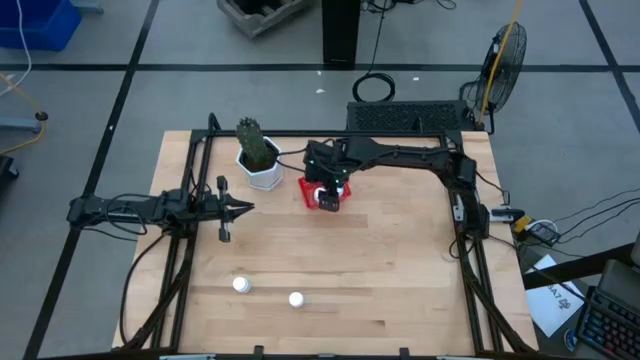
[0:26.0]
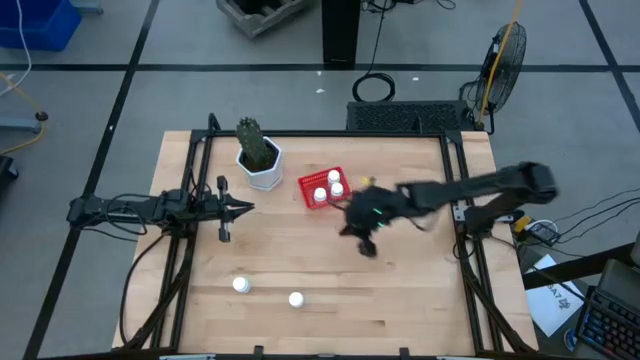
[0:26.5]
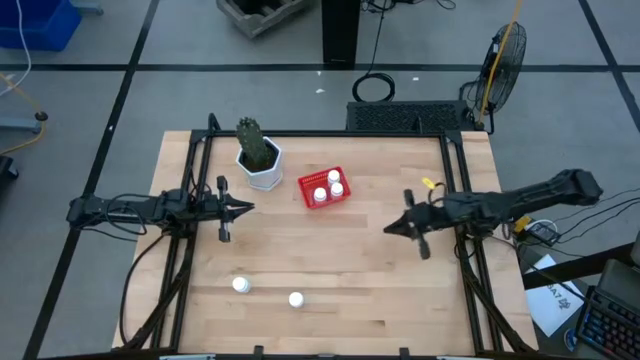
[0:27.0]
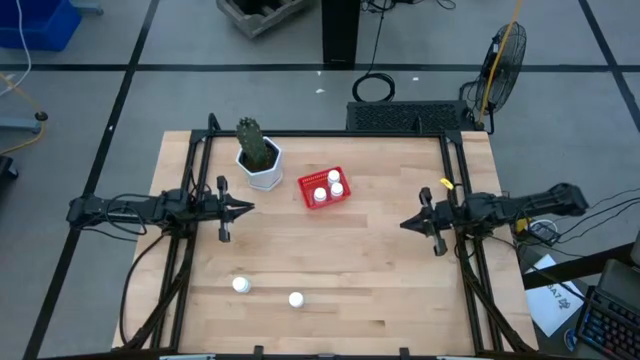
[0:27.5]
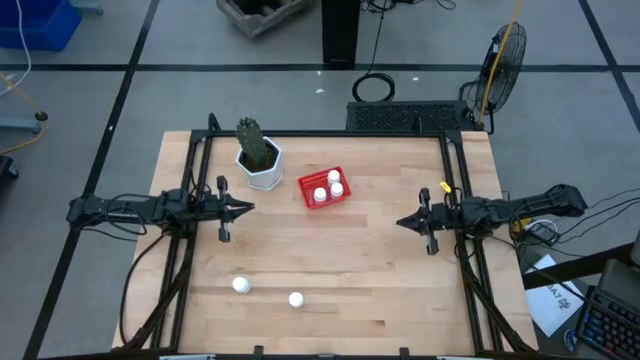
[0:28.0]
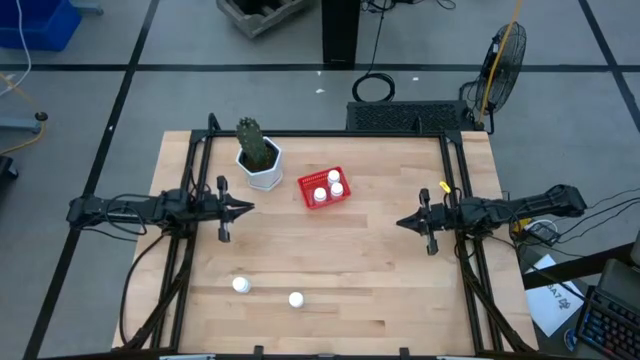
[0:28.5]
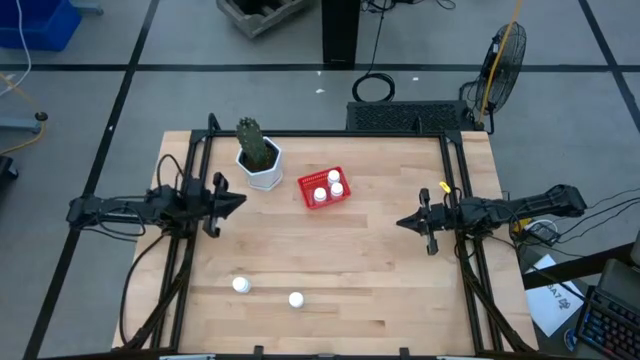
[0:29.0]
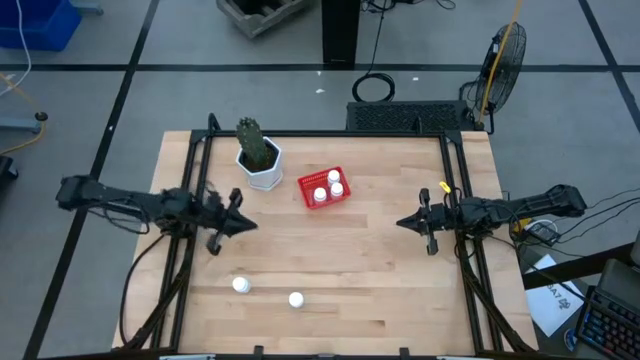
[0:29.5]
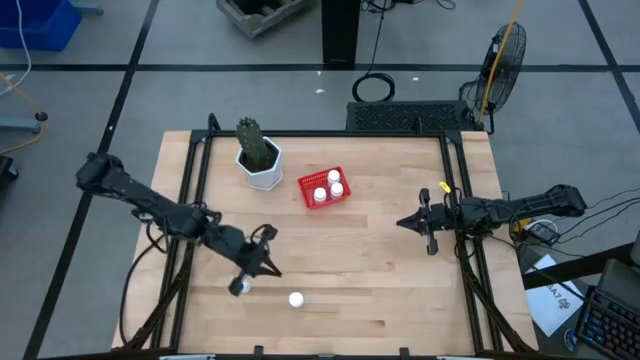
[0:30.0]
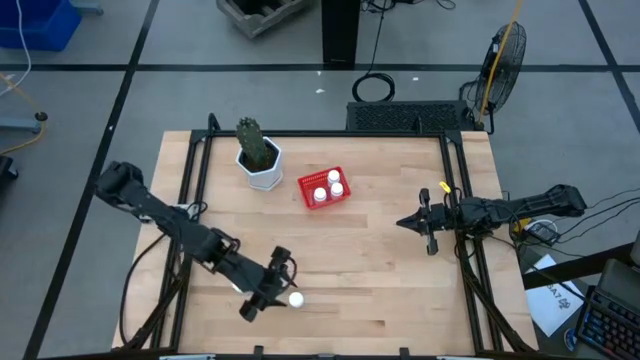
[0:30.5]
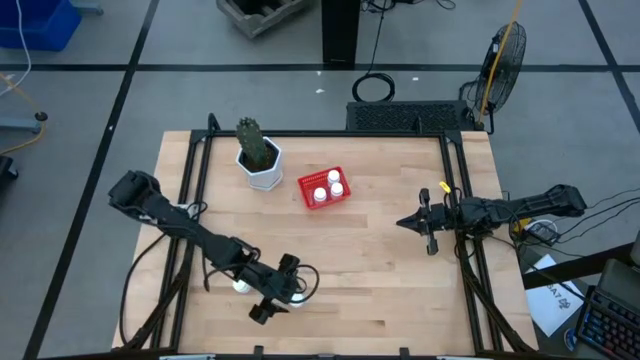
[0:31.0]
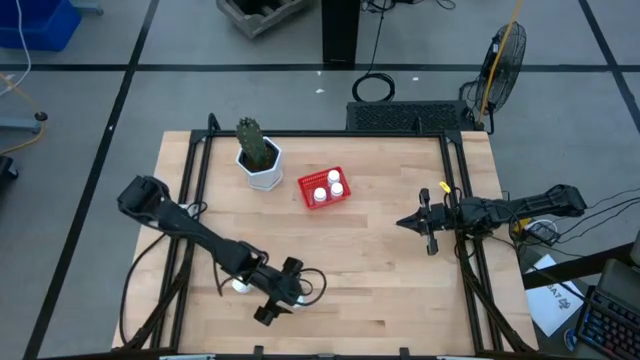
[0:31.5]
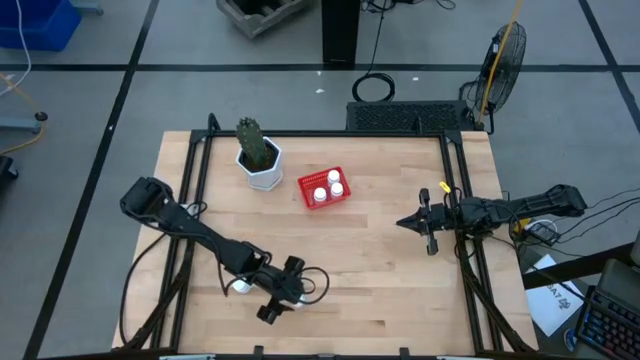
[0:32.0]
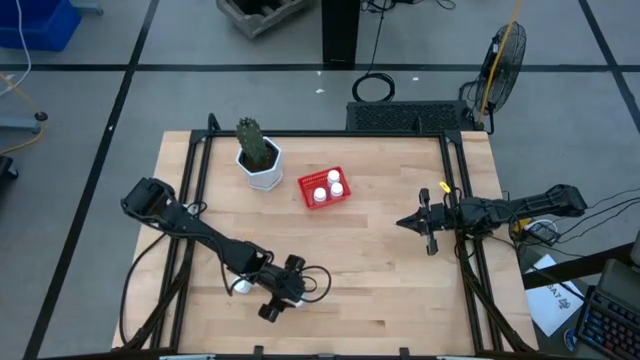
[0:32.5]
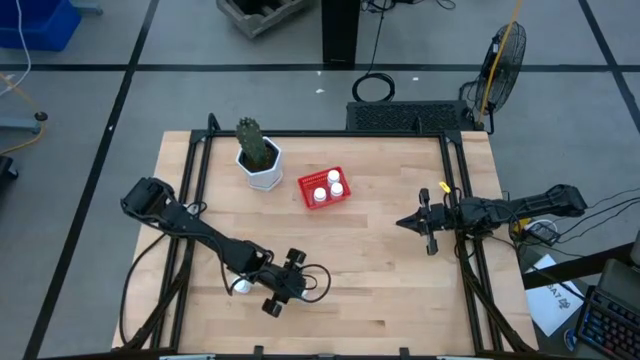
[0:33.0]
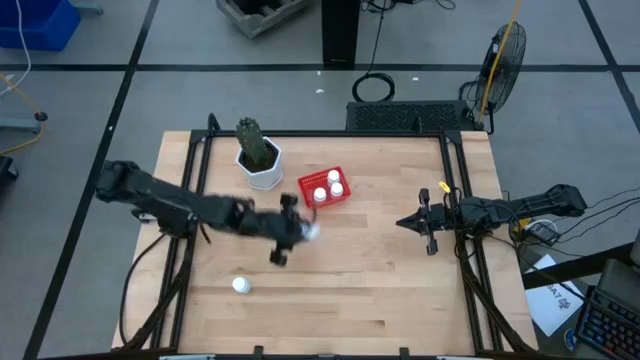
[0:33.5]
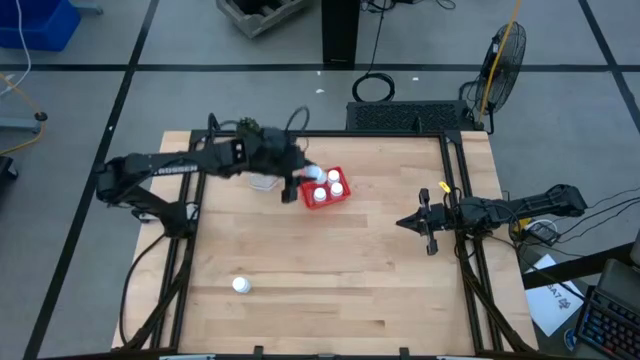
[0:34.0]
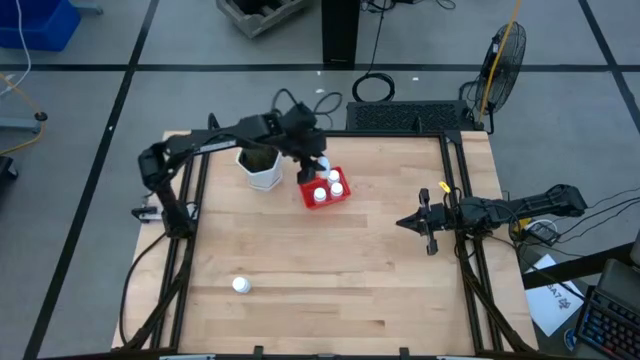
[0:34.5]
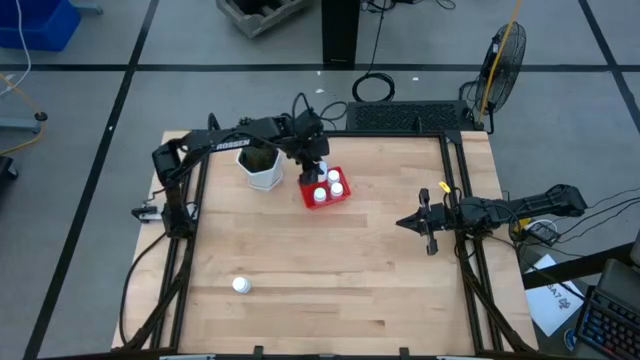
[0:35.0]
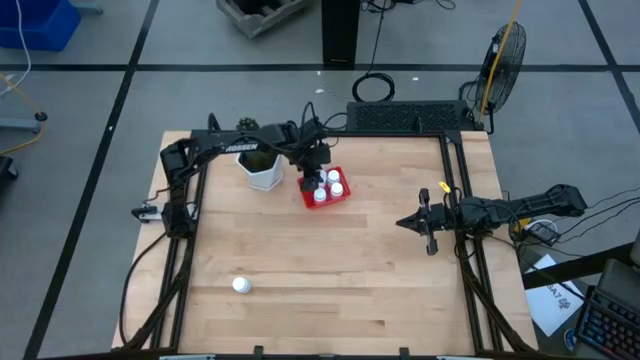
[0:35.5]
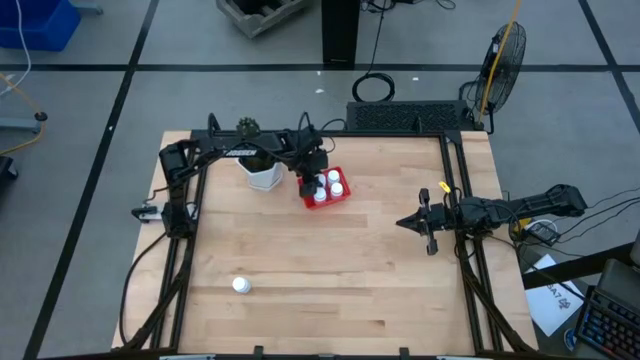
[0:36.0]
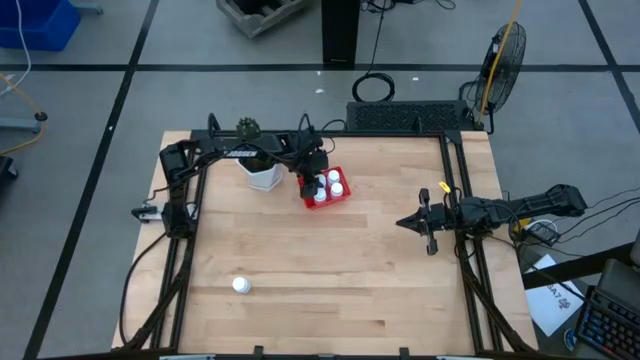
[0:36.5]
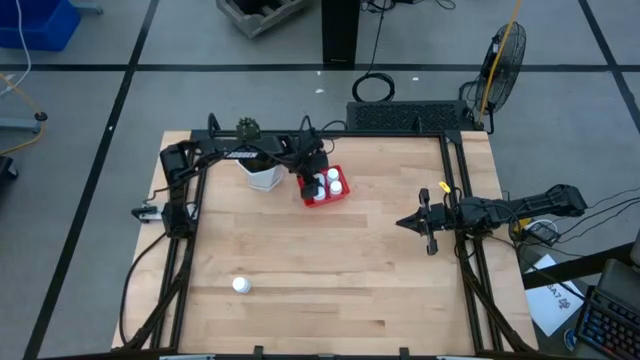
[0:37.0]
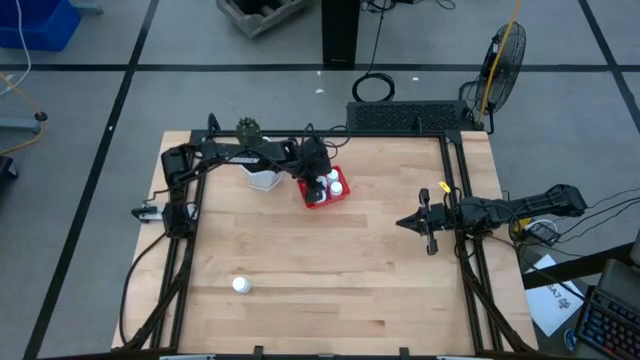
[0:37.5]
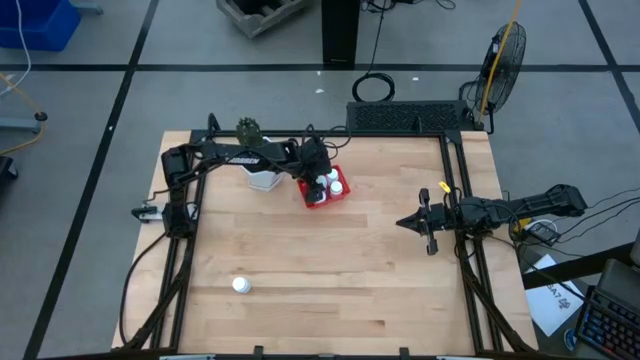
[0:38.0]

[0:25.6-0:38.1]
Task: Pick and place pill bottles into a basket
Put the white pill bottle into the red bin

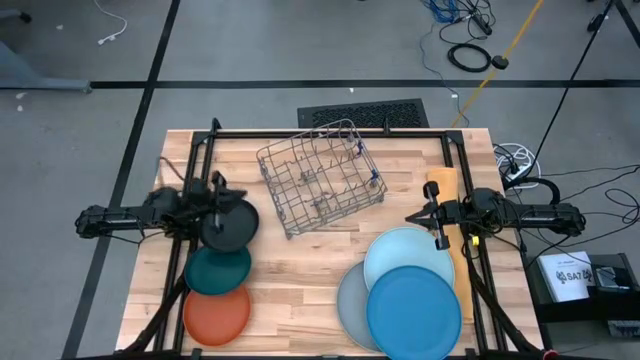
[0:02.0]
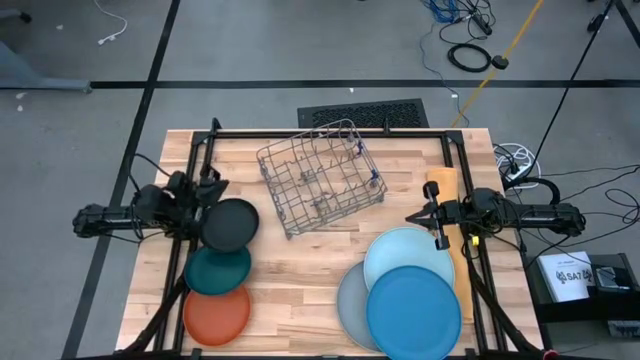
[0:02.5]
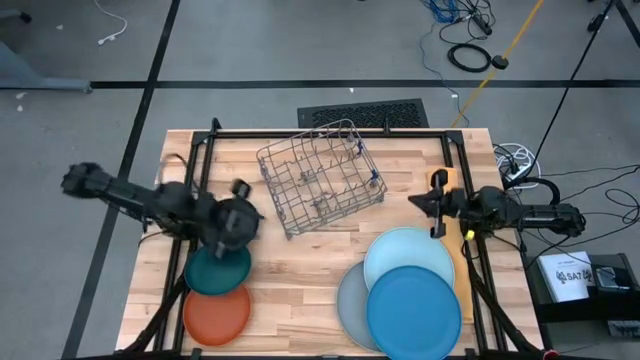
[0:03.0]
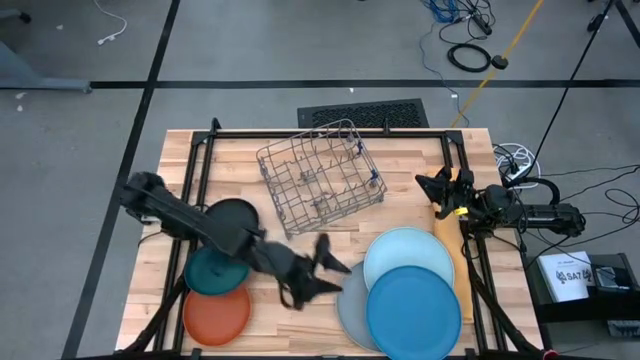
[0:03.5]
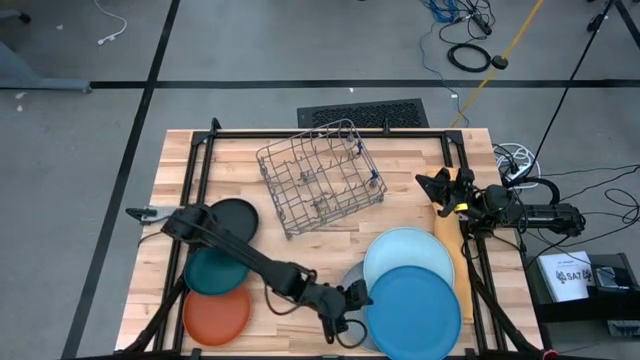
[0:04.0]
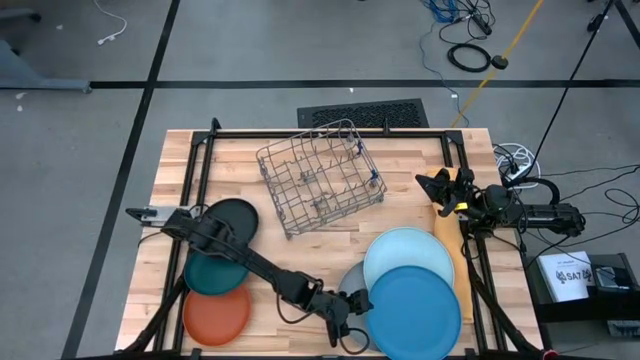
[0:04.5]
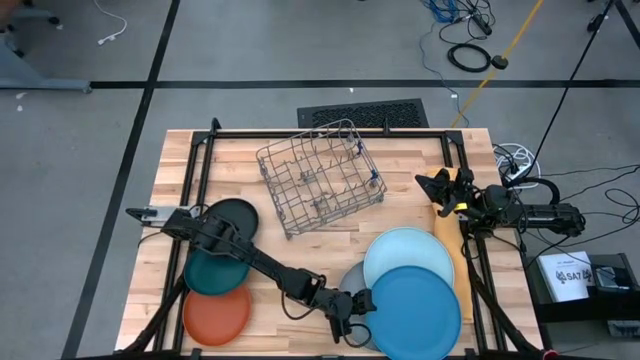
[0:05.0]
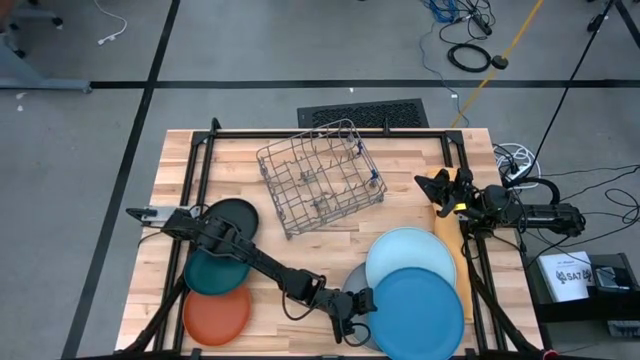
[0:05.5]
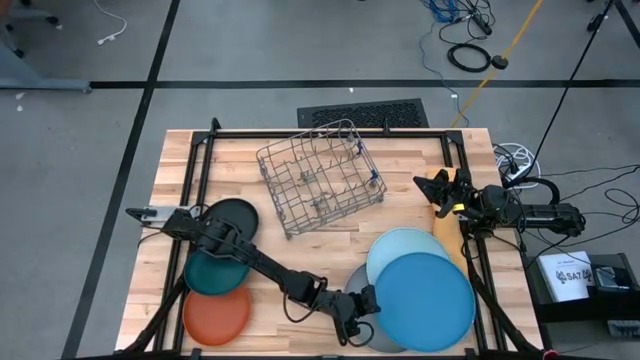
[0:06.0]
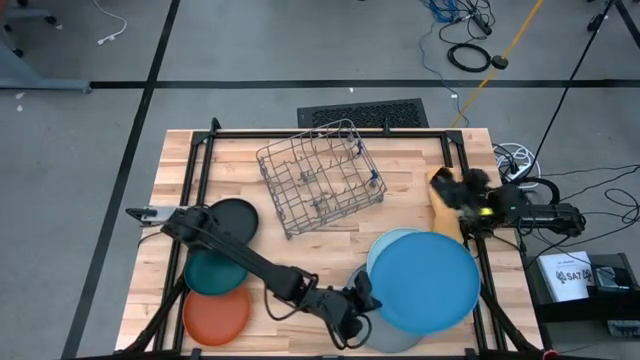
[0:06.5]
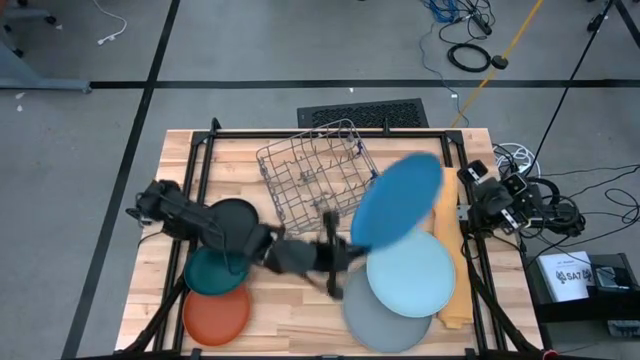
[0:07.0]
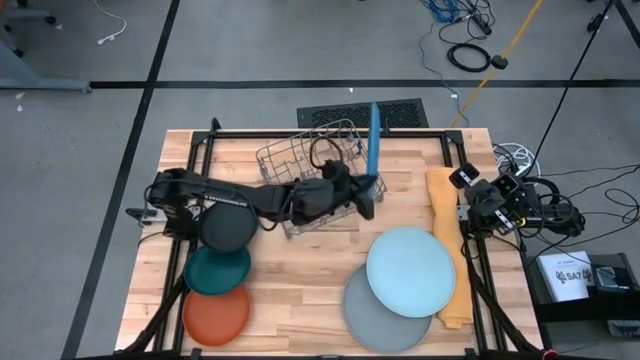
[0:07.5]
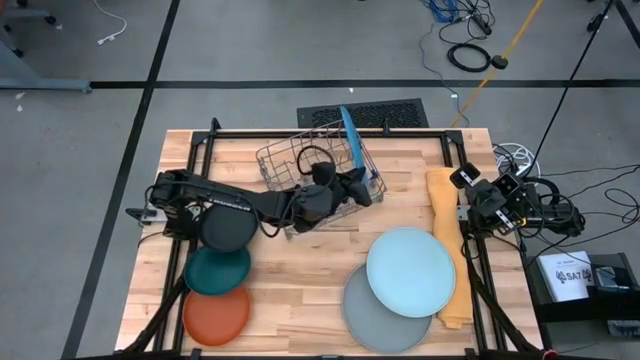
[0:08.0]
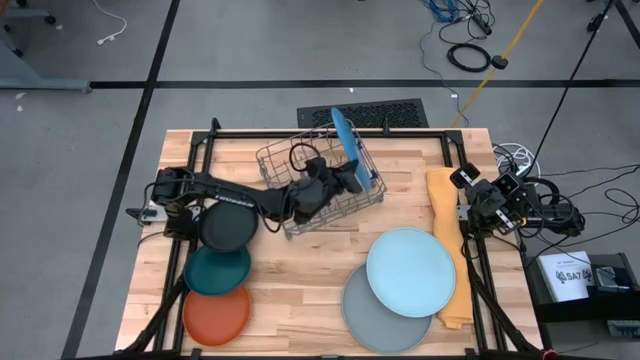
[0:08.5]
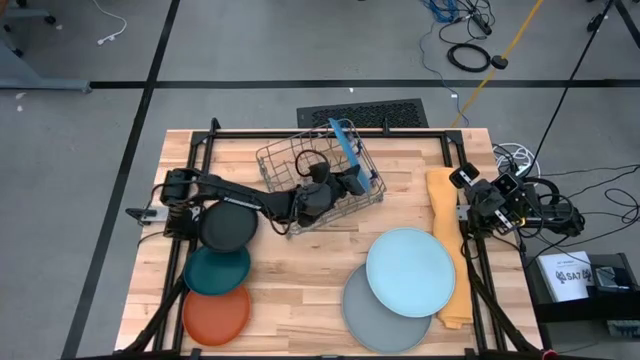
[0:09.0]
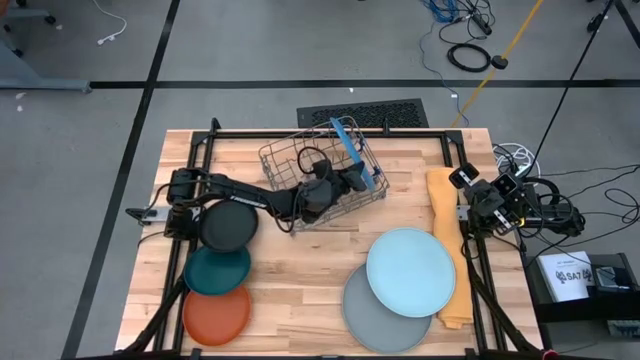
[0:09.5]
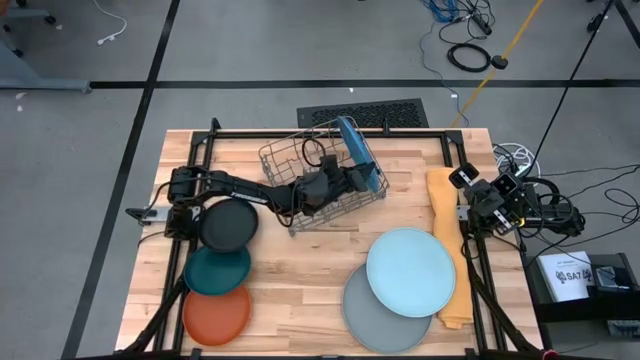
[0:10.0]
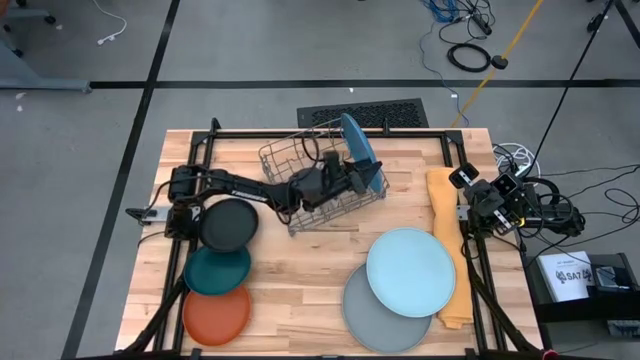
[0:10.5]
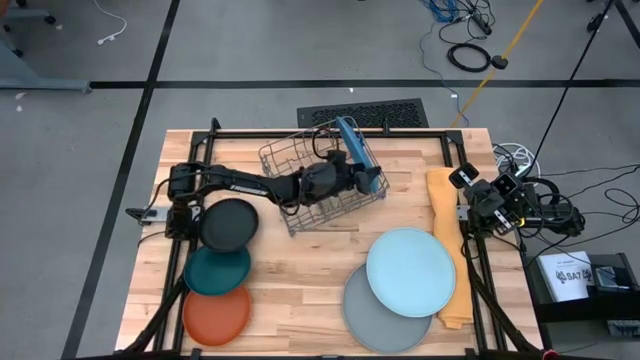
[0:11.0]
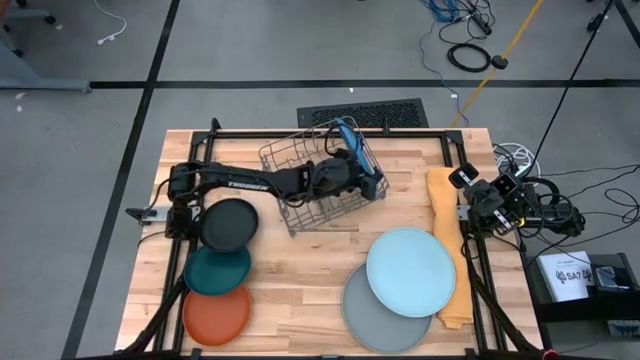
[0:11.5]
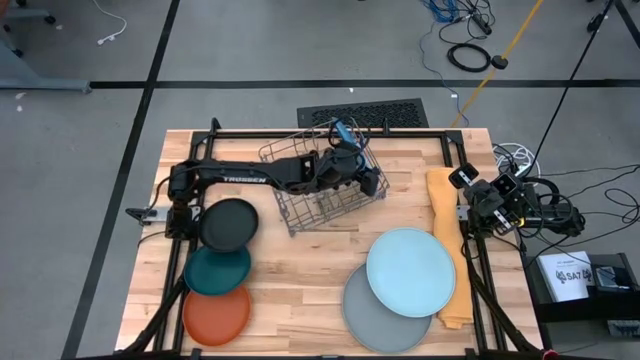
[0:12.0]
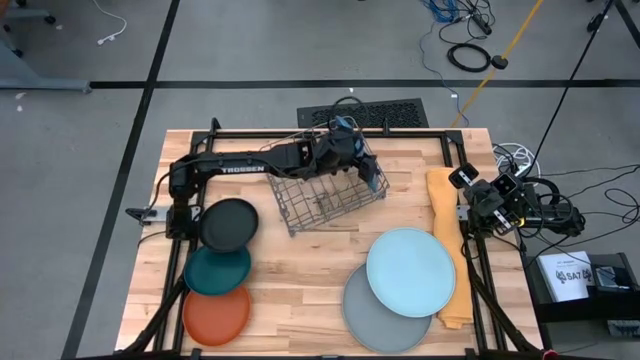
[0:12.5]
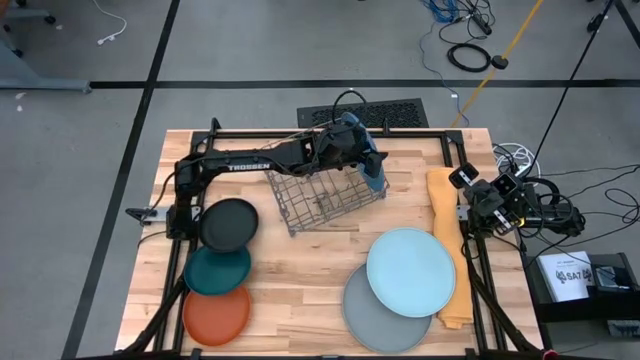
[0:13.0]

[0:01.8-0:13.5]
Task: Sort dishes
Put the blue plate into the dish rack
